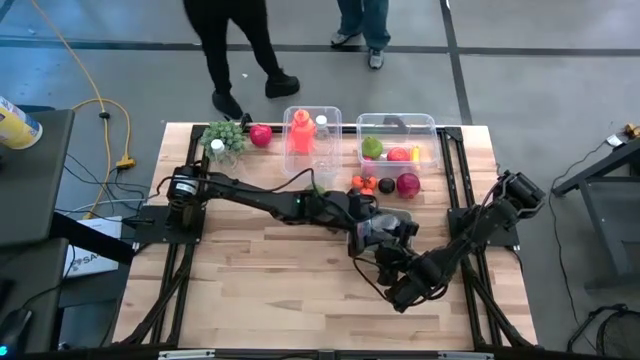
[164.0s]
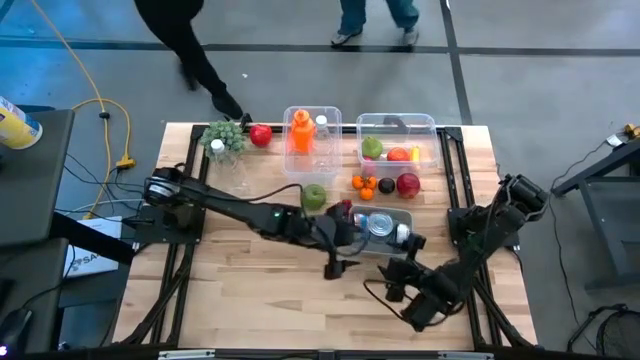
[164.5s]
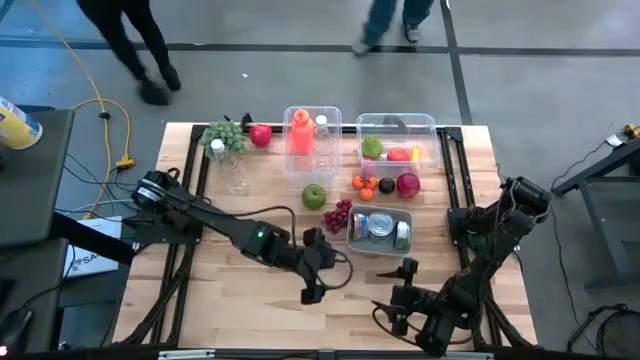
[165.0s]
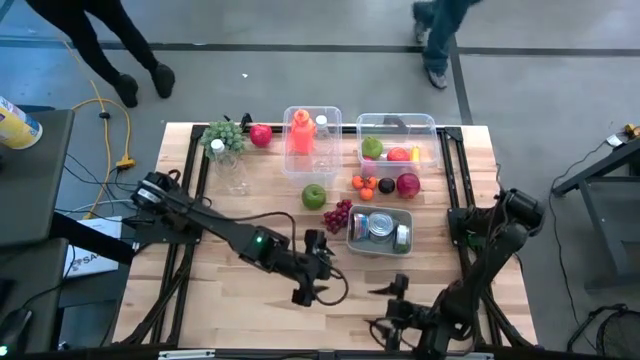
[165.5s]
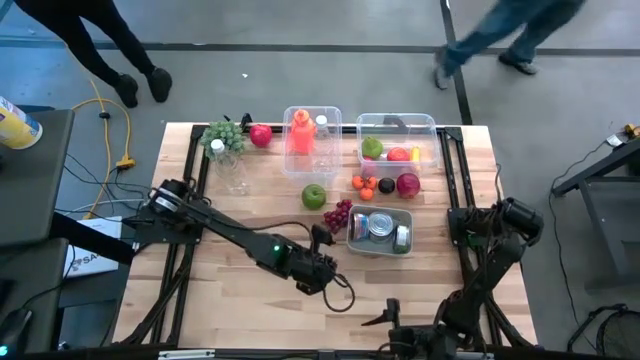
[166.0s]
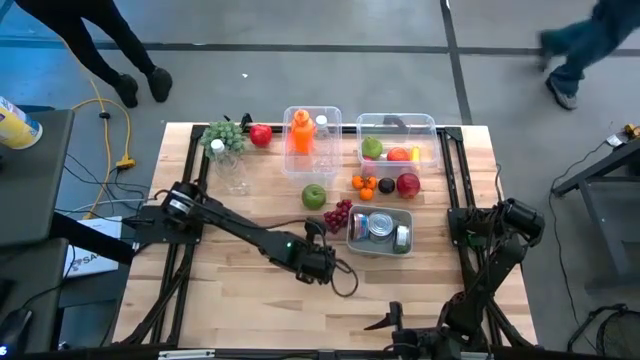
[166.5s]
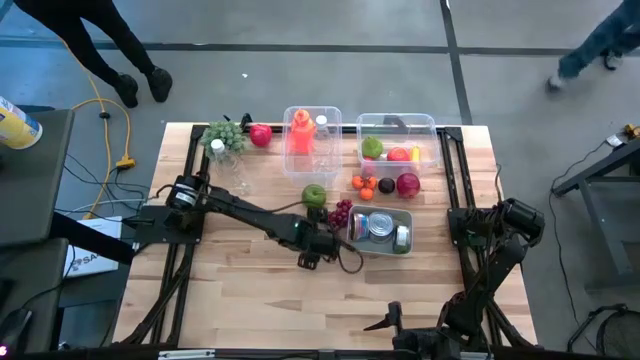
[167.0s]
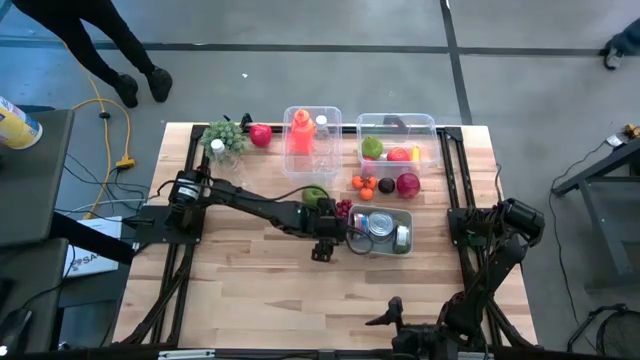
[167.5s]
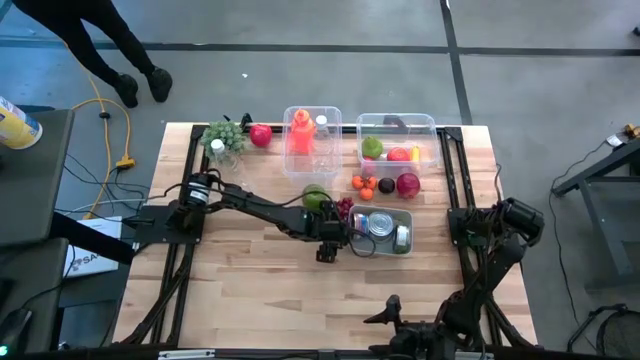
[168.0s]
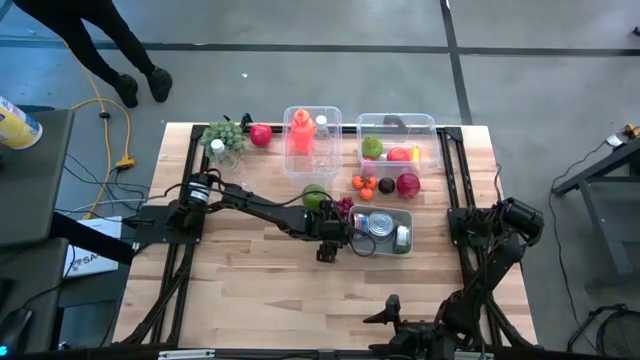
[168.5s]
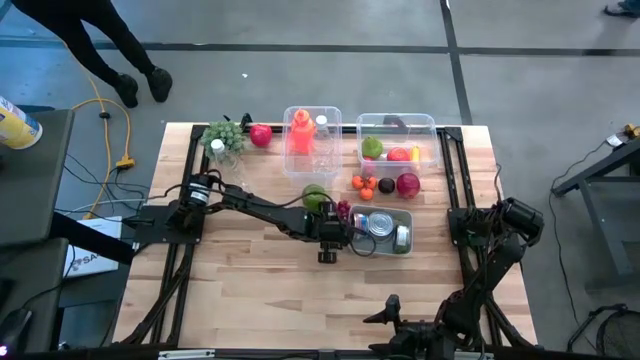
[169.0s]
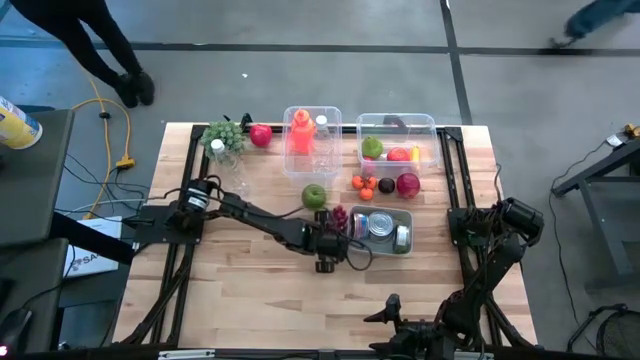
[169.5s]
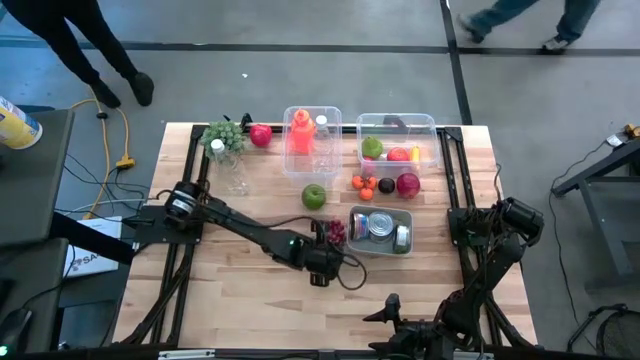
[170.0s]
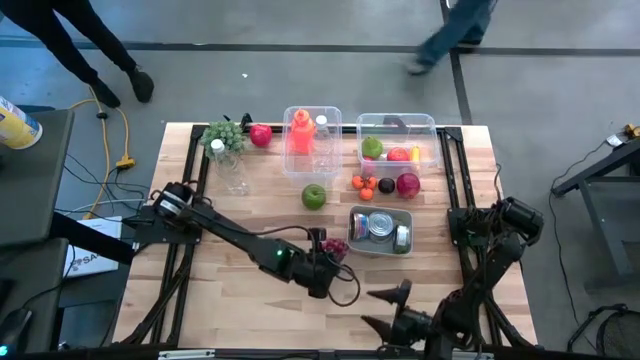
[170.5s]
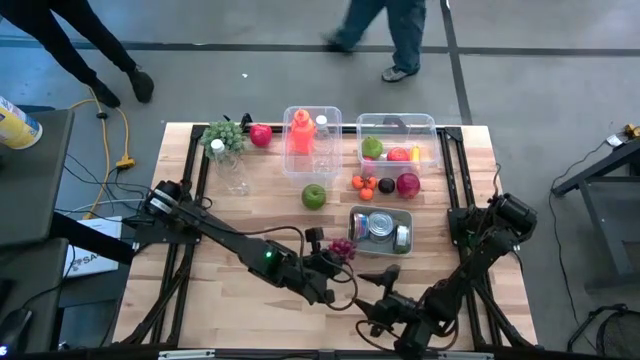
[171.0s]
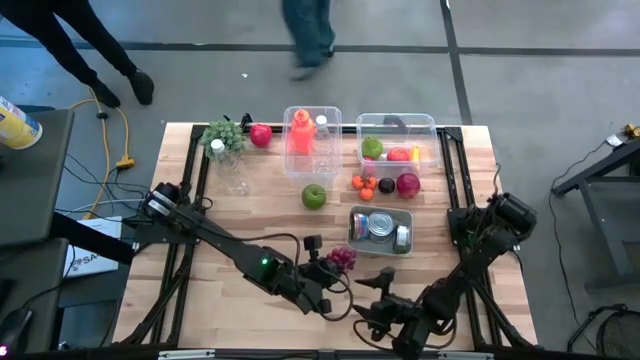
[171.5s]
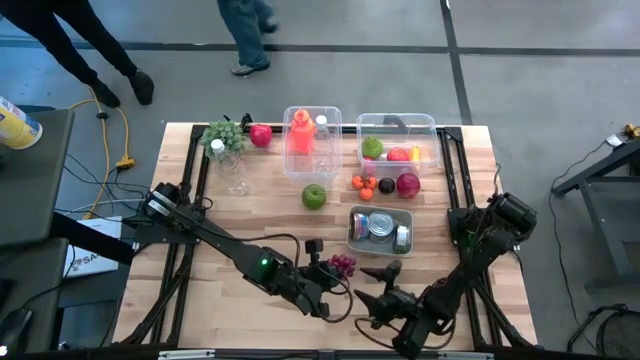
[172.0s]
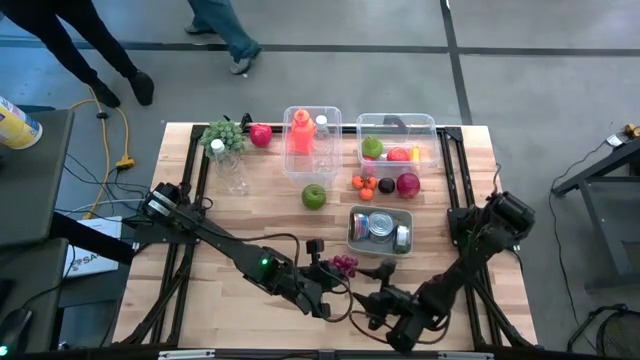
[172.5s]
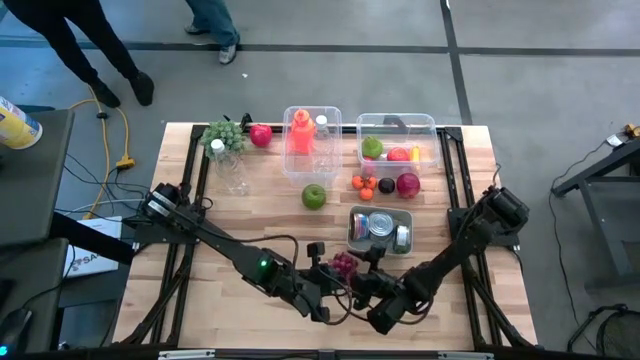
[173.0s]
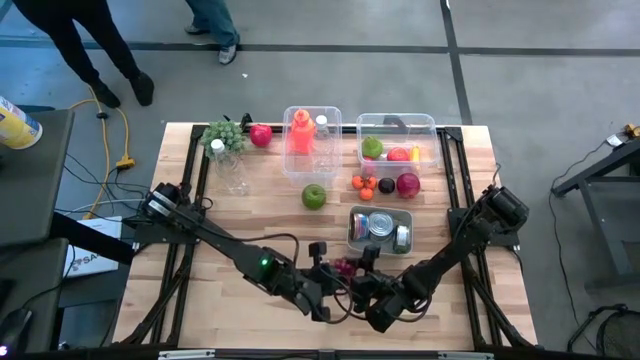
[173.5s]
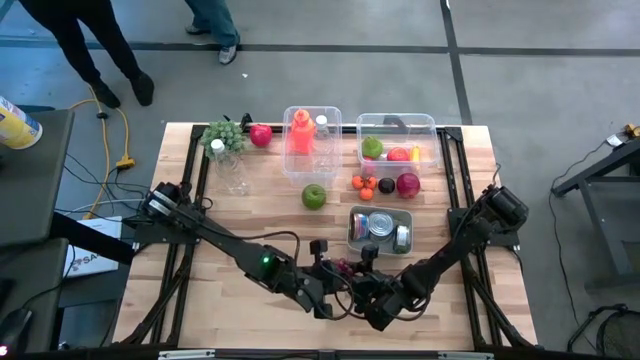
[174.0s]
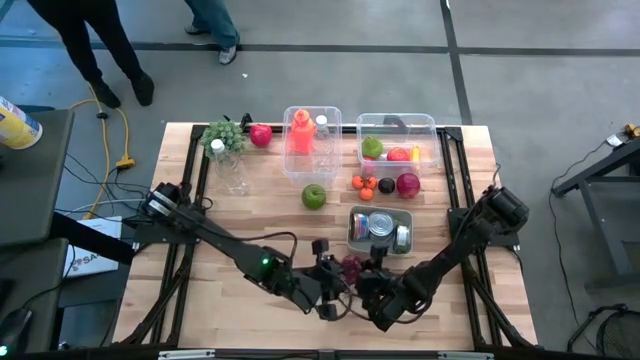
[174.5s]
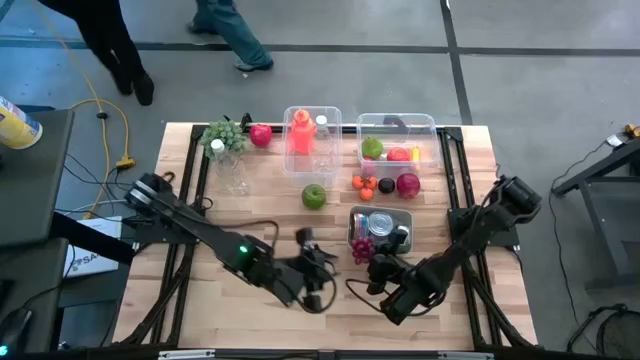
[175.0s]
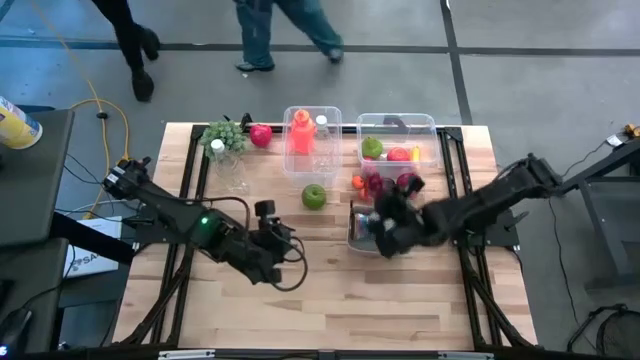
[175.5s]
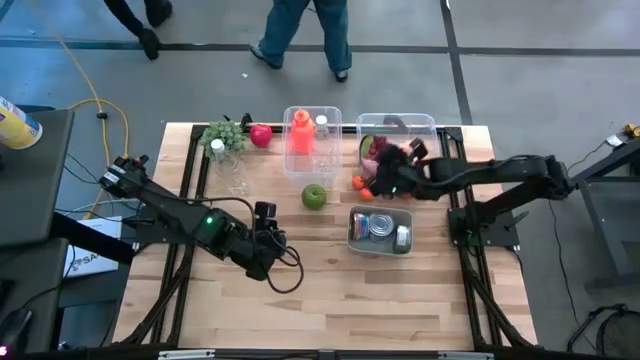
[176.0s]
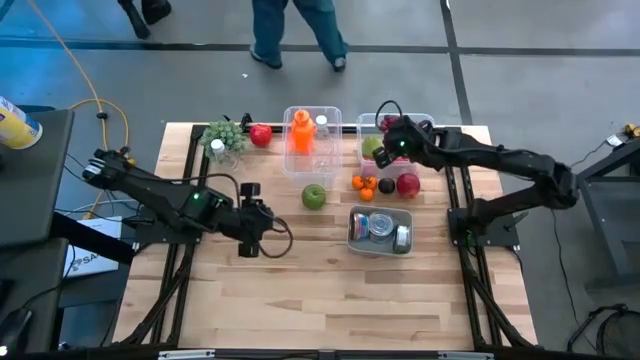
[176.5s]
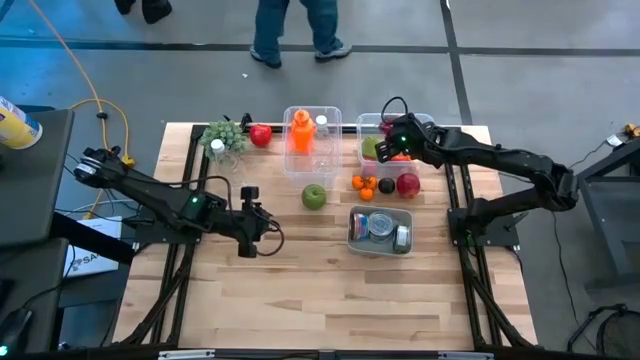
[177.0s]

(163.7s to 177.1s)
Task: Pick & Place Food Item
Put the grapes into the right transparent bin

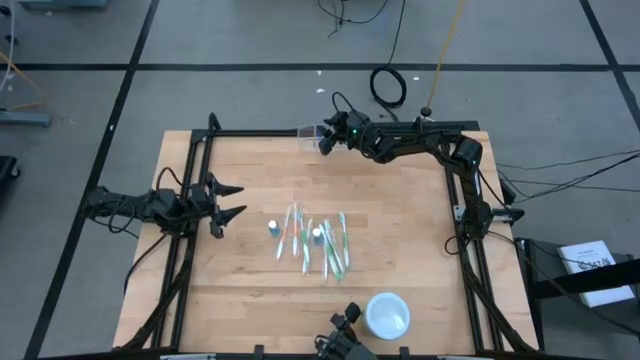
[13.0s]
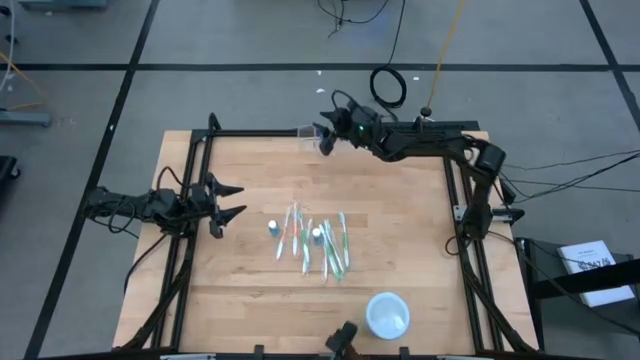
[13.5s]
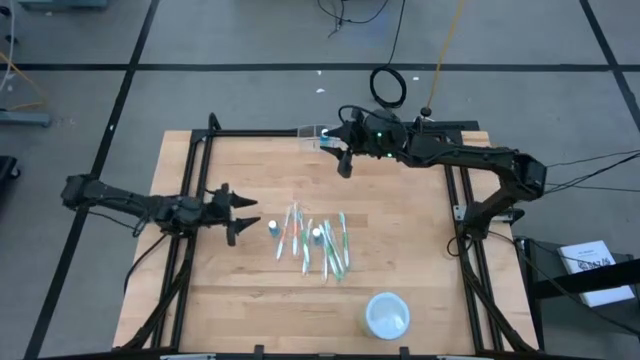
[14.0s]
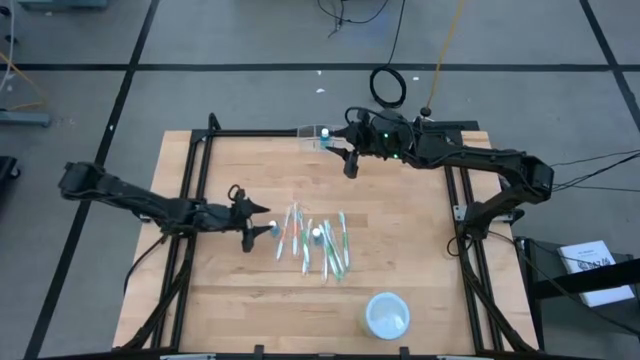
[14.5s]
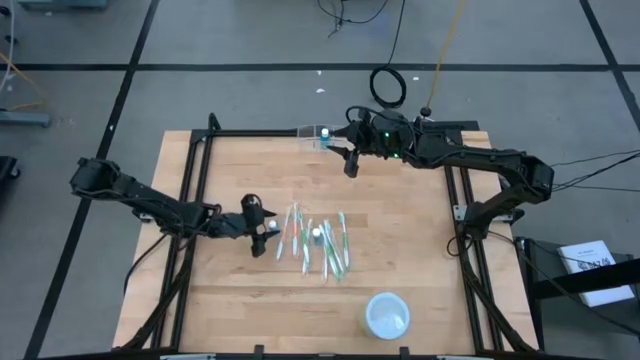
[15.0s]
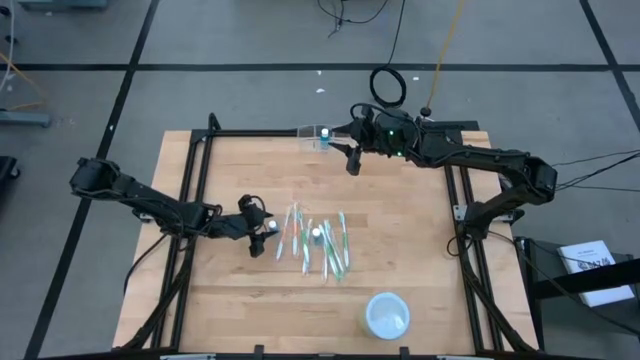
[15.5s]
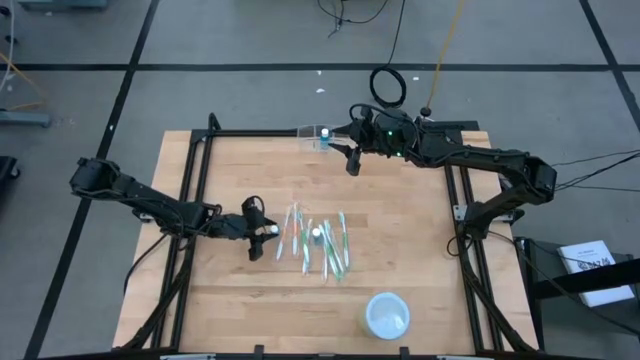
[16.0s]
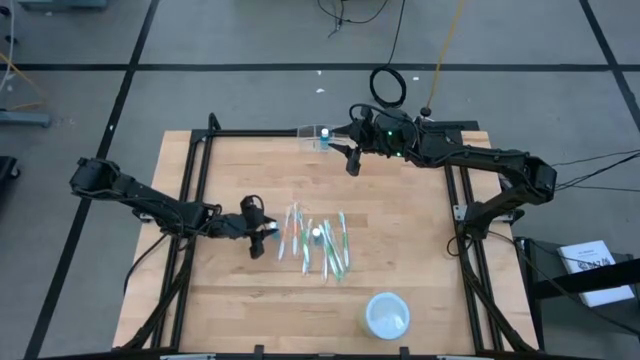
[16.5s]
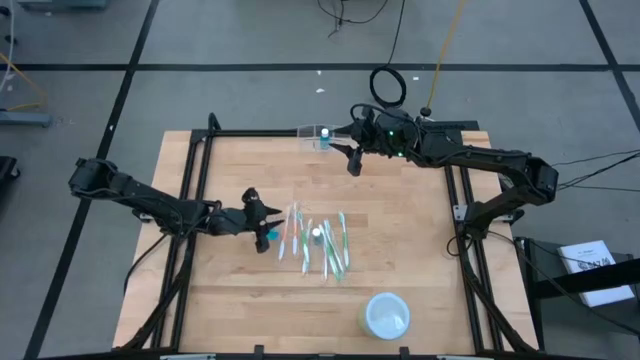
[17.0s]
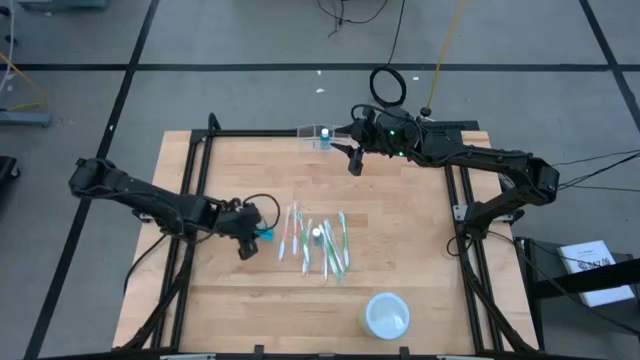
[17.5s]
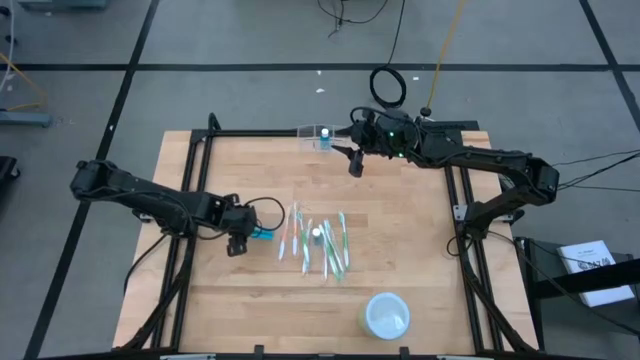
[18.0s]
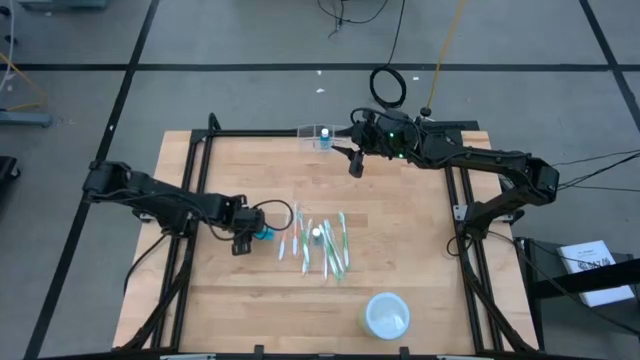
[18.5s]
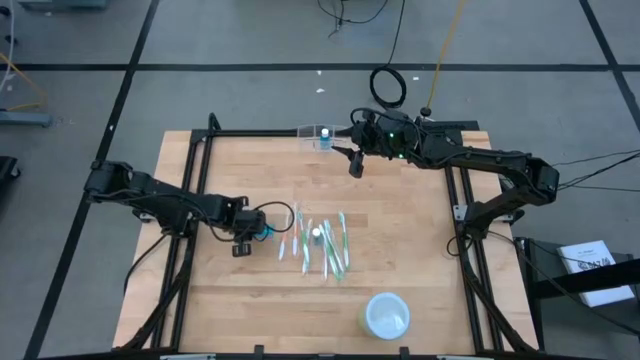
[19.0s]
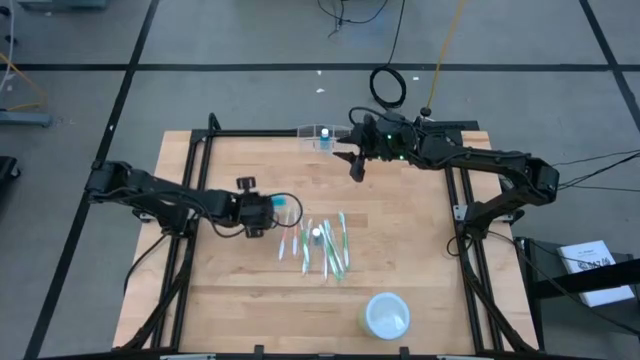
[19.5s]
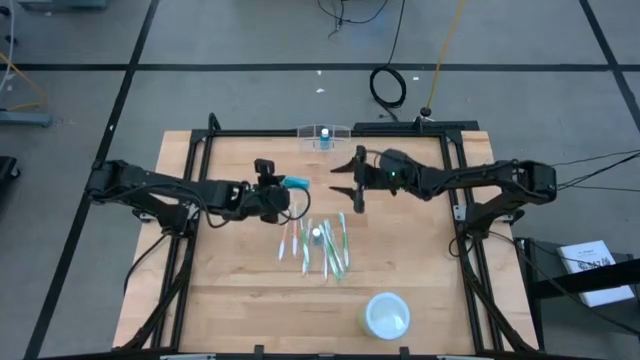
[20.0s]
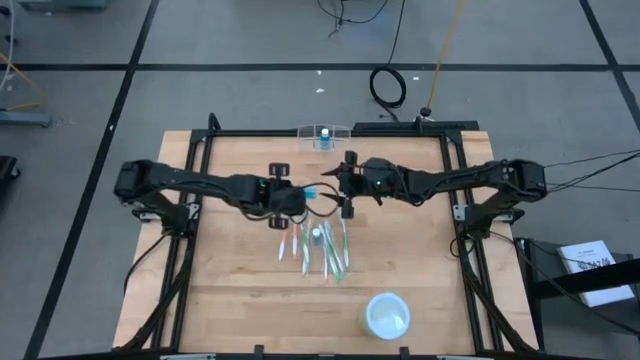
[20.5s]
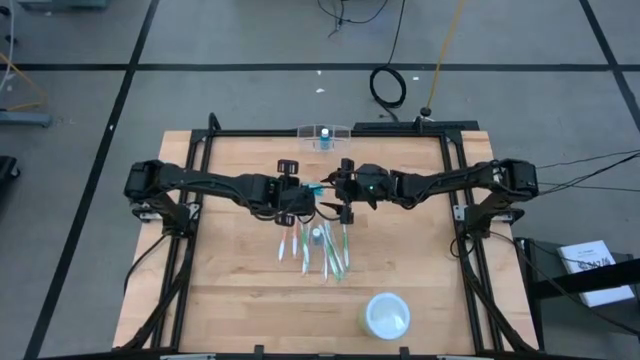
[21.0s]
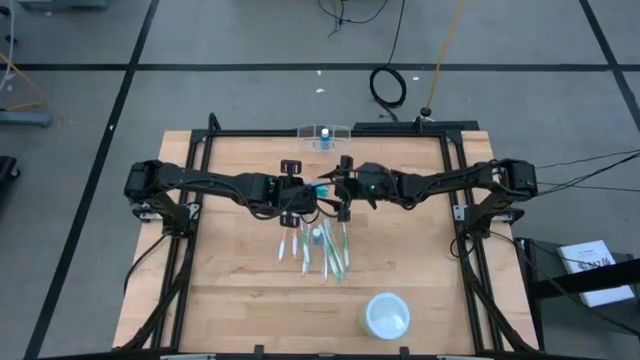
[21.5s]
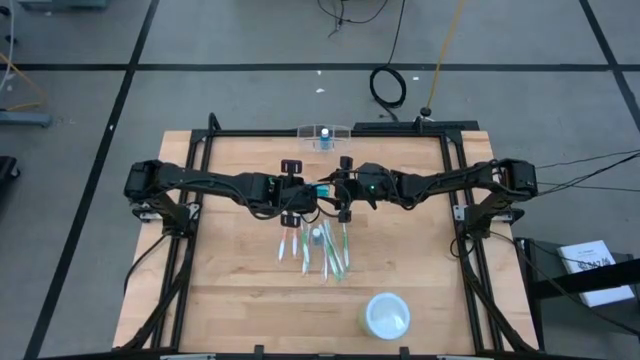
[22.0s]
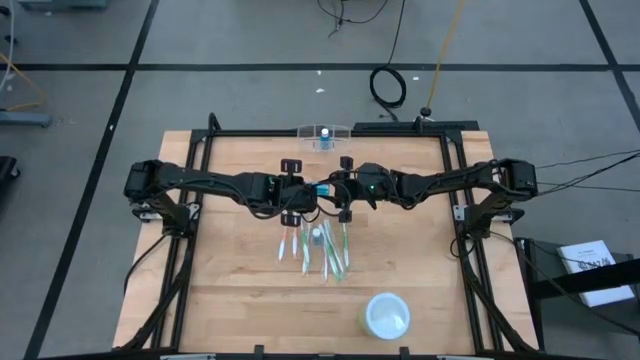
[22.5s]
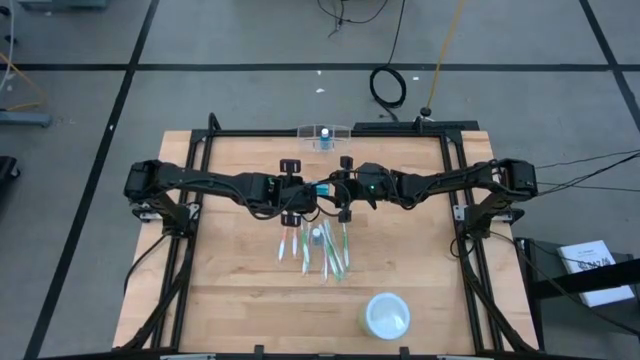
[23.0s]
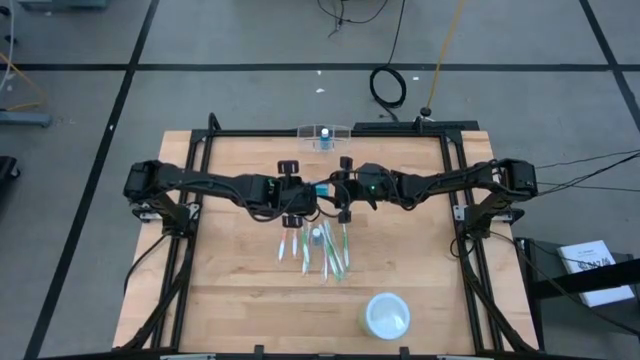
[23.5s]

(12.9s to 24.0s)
Task: Pick & Place toothbrushing station
Put the blue mouthwash into the transparent organizer
